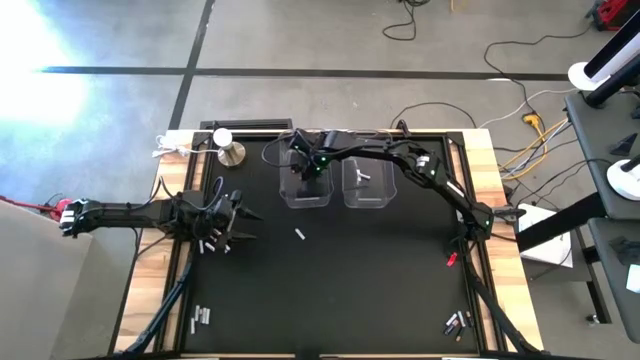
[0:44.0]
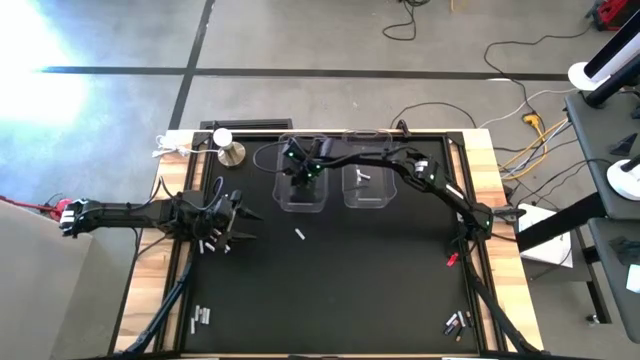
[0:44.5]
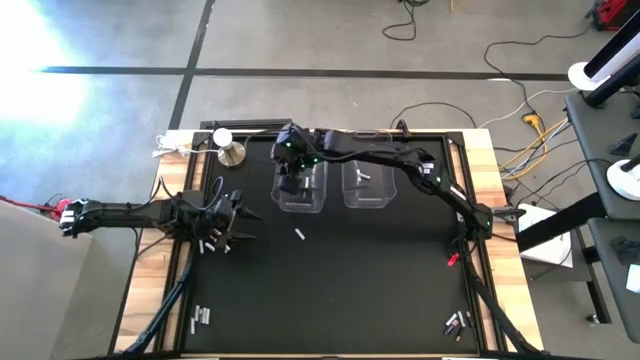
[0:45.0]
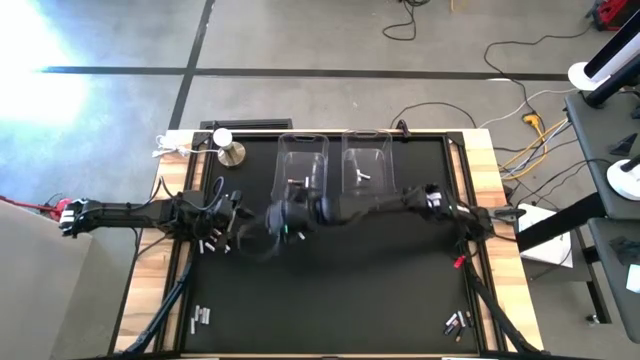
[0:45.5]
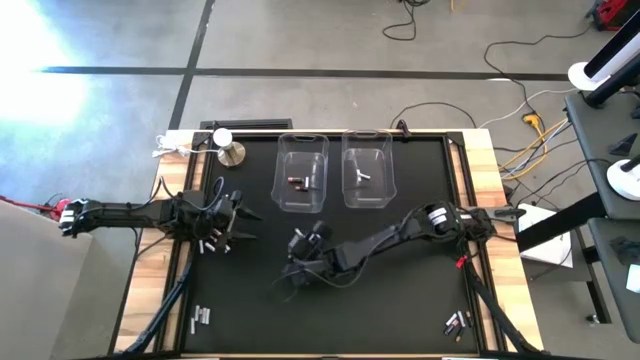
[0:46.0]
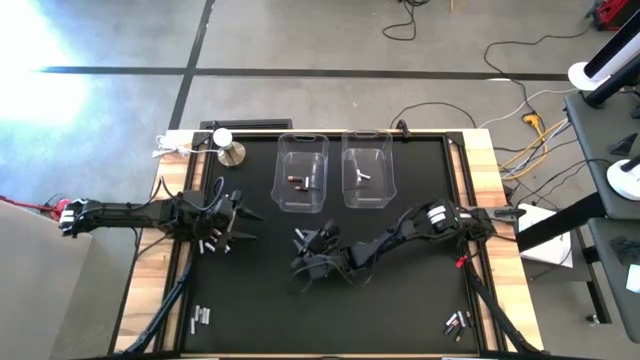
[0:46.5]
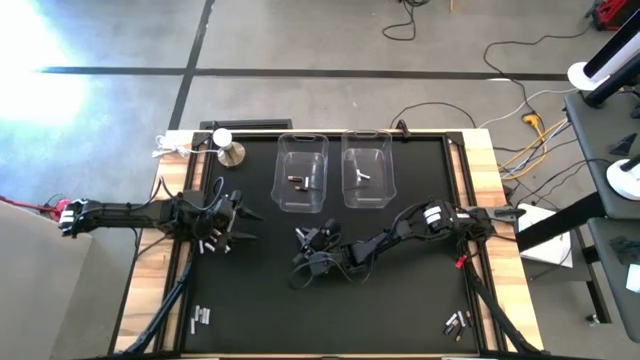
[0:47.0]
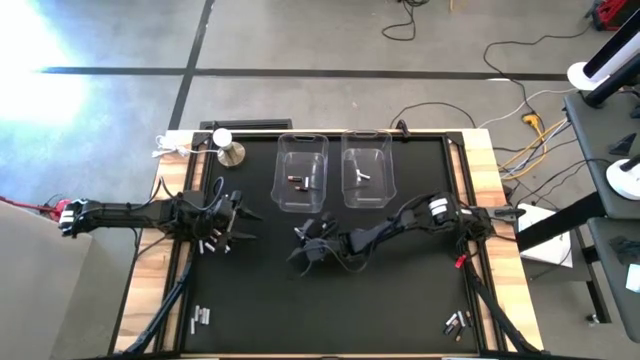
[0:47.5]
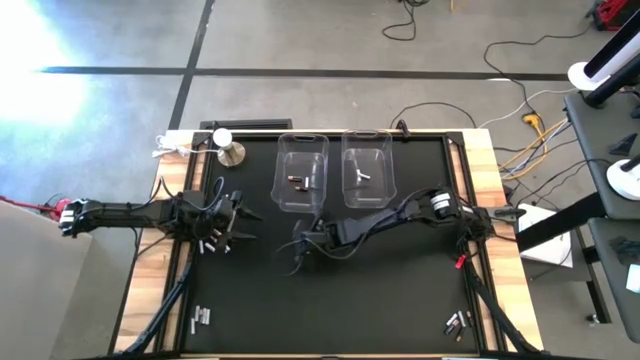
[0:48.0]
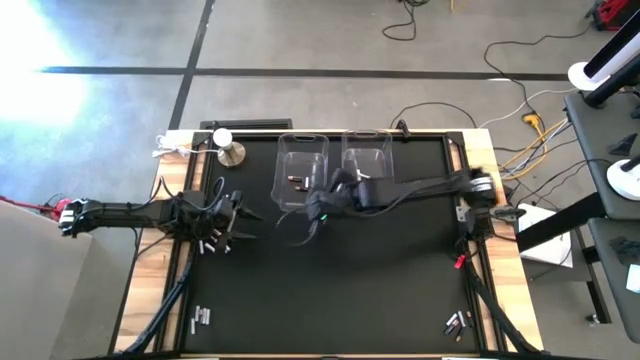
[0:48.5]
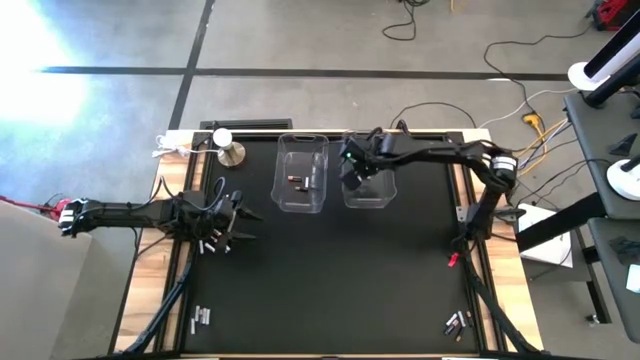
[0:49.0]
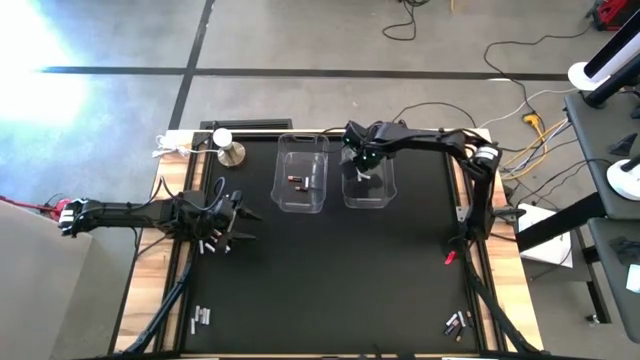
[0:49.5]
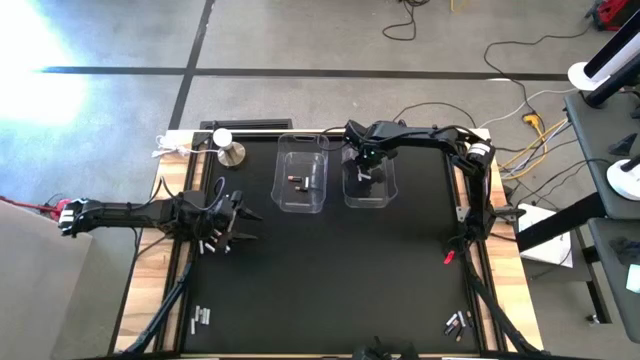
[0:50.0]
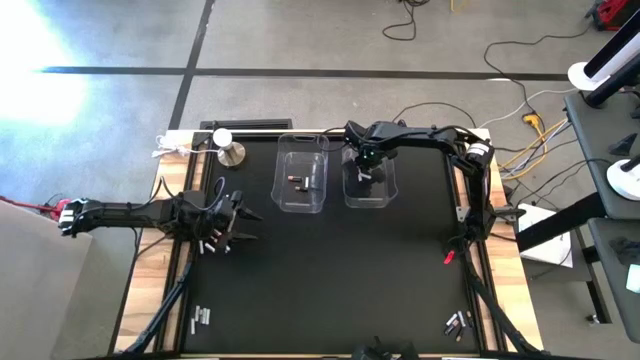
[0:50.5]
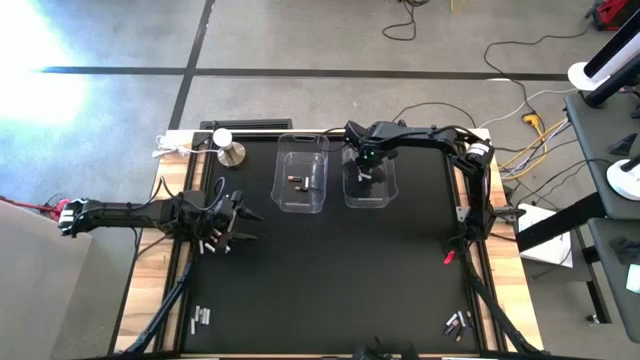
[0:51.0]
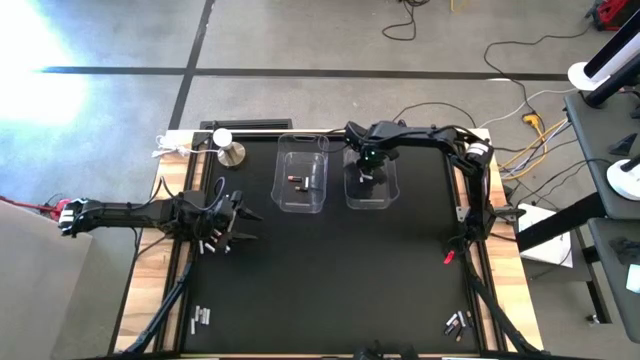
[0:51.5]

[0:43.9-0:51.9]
Task: Sort batteries
Put the white battery into the right transparent bin

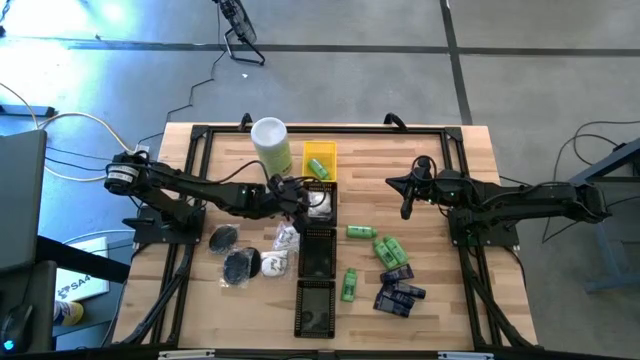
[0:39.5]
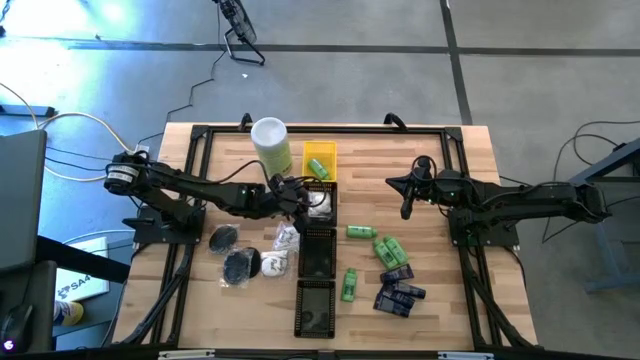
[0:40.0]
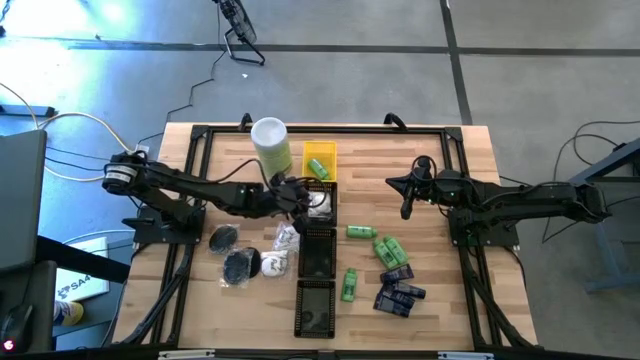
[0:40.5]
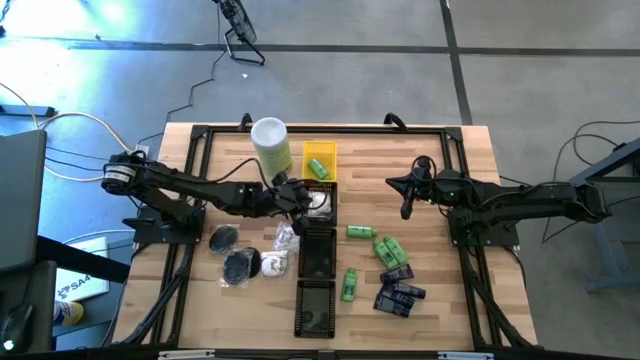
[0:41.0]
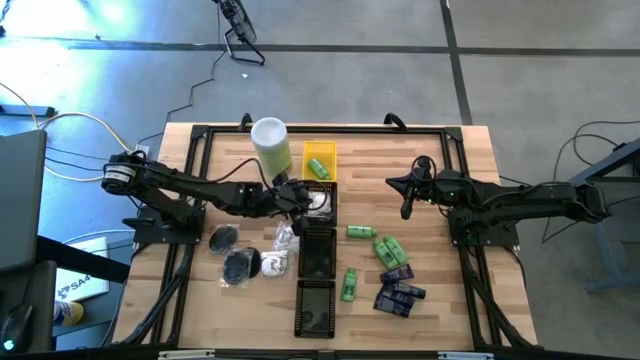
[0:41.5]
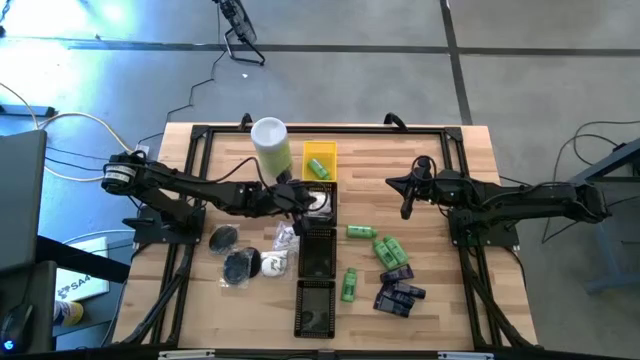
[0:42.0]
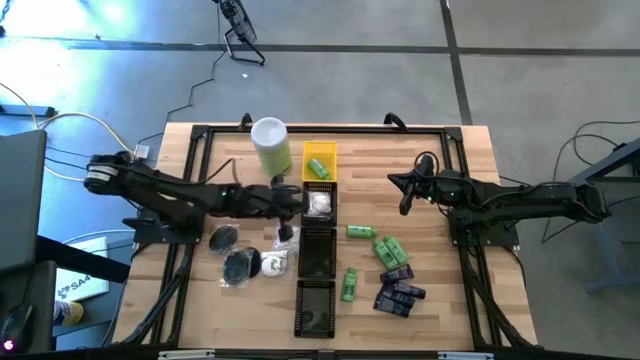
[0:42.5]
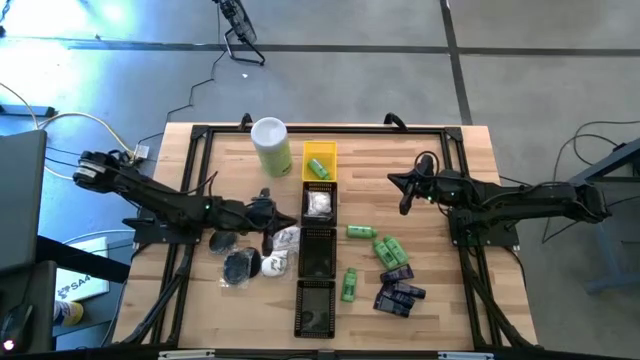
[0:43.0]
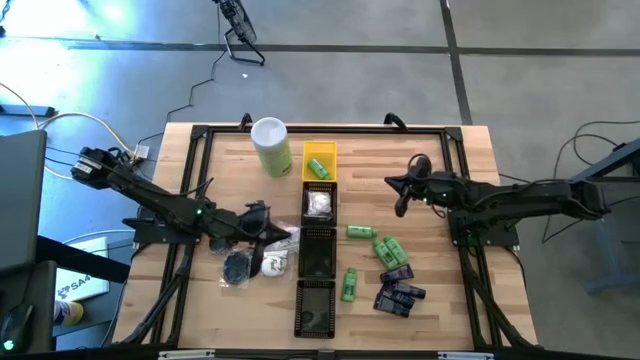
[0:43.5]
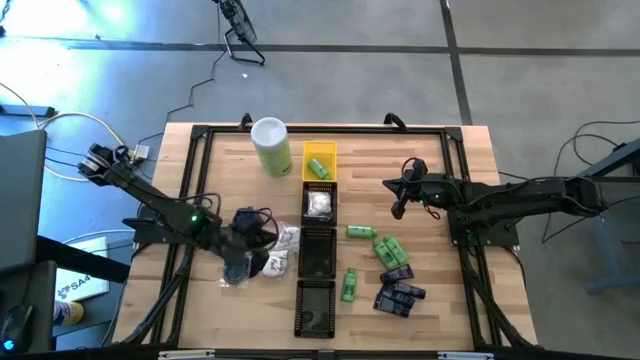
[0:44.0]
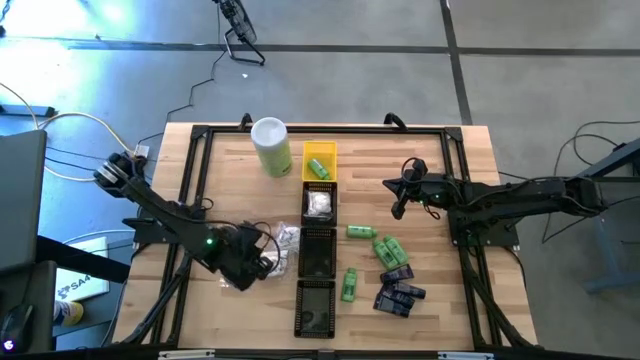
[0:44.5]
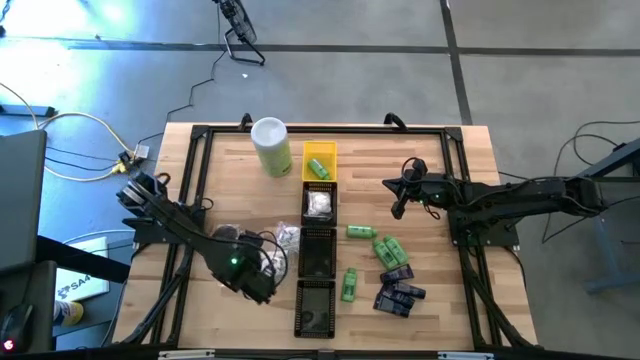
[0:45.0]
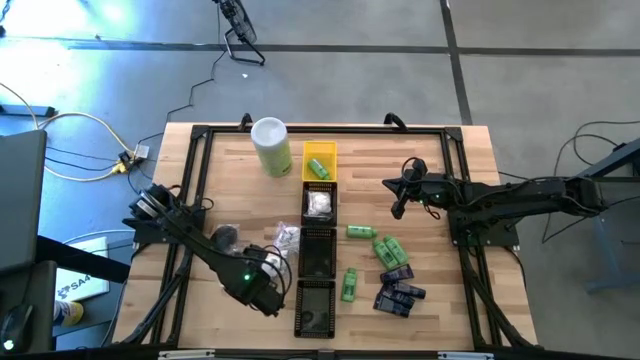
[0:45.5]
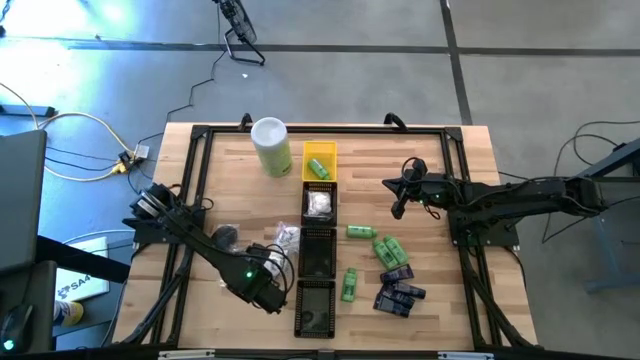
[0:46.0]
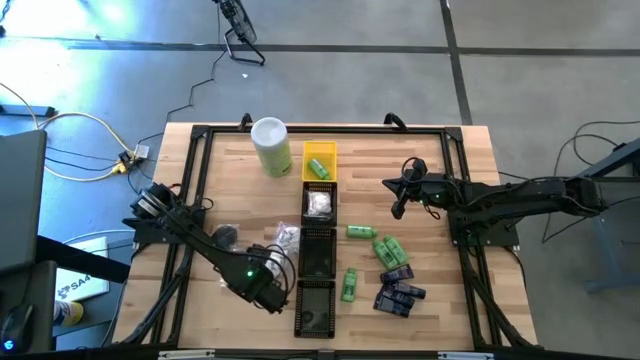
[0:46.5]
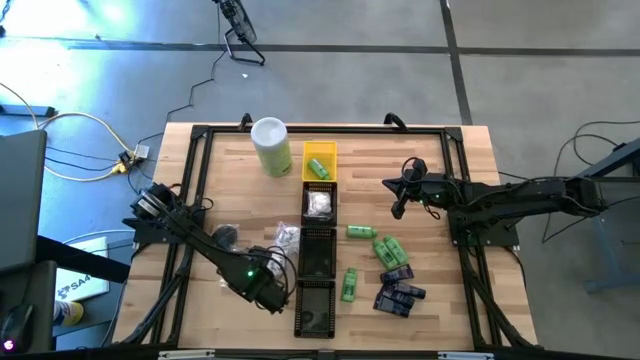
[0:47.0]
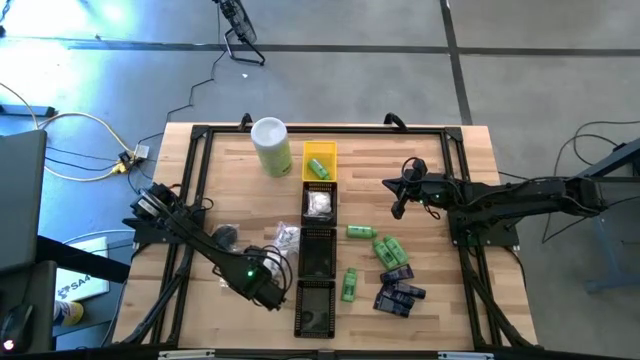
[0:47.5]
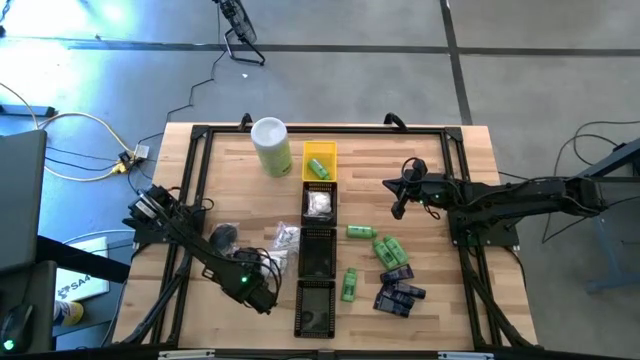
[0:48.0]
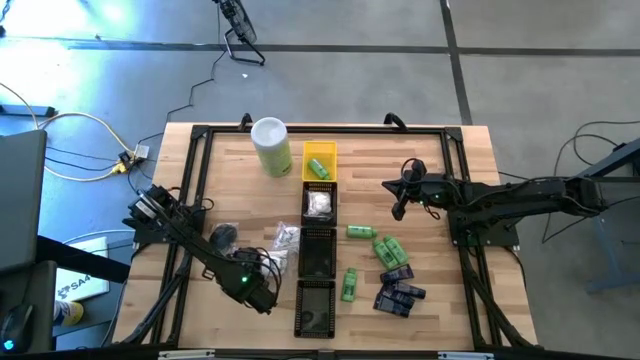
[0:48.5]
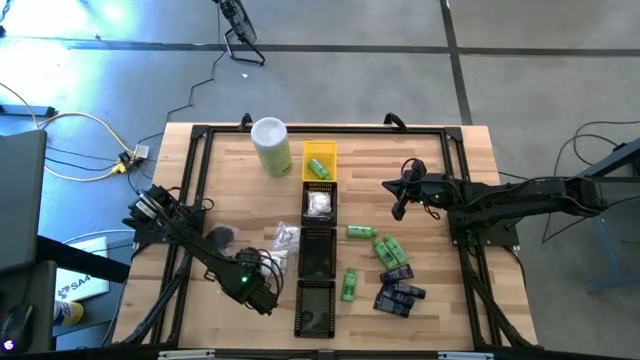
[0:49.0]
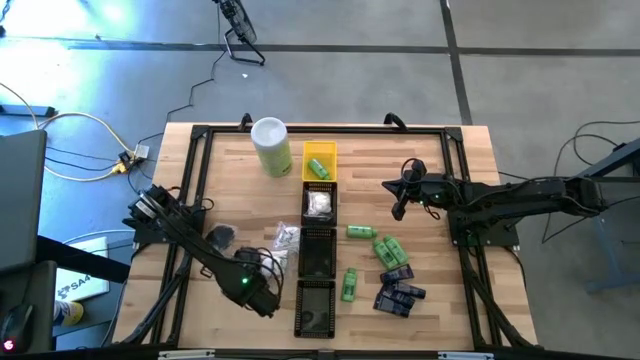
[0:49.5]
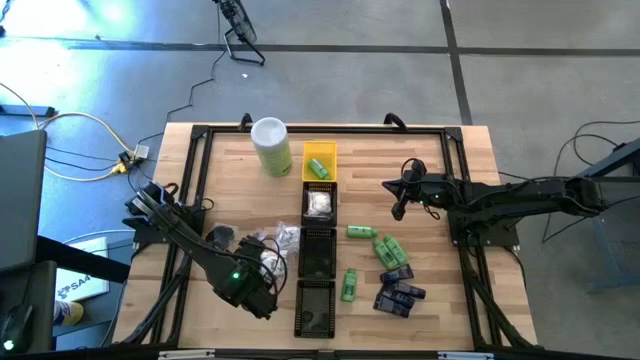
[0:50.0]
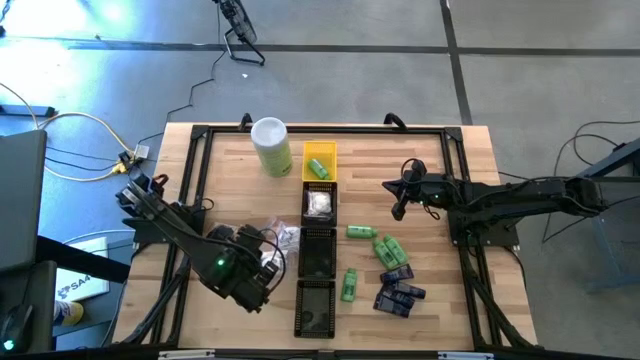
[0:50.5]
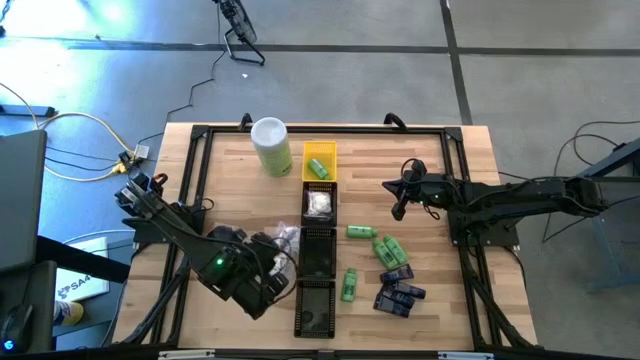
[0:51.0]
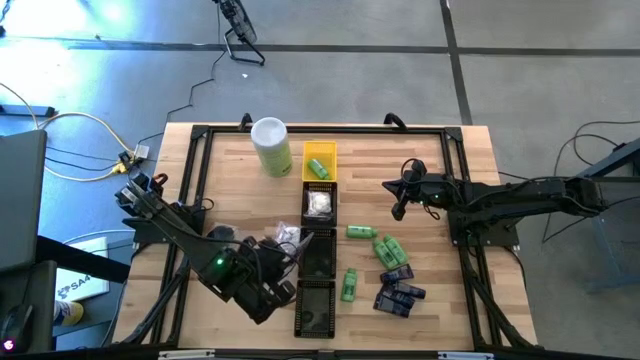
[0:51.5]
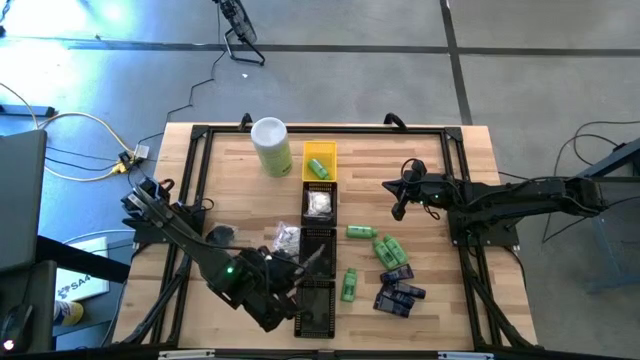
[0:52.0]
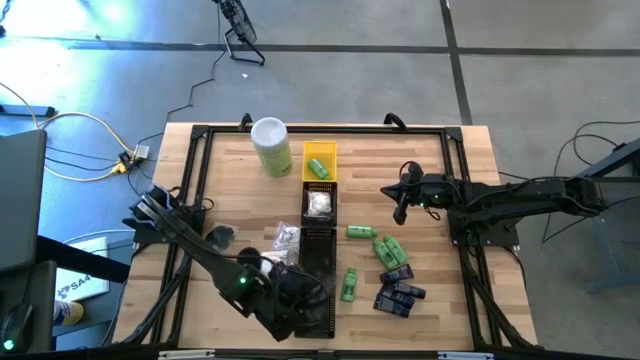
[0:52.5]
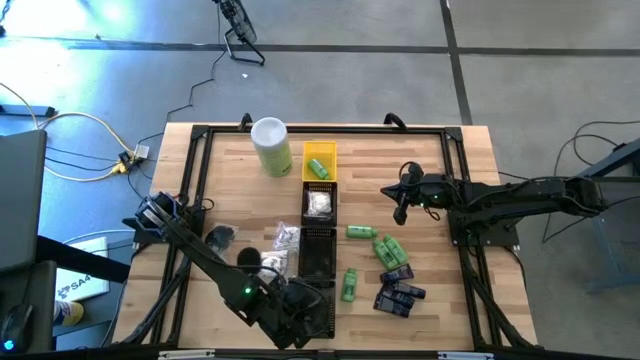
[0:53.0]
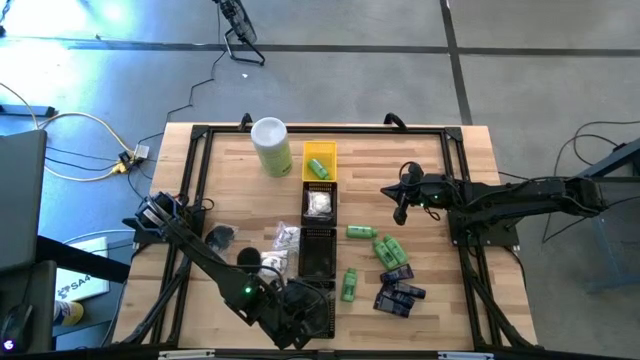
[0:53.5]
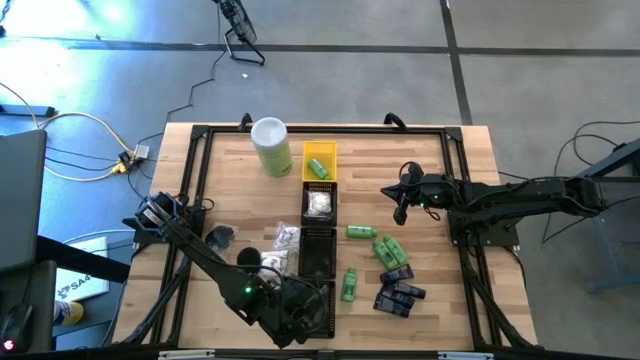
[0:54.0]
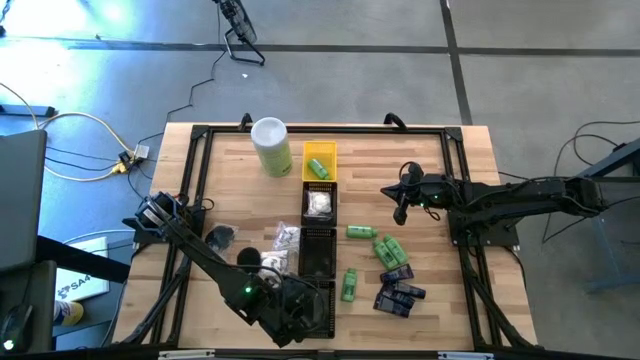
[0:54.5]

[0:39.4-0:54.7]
Task: Pick & Place Travel size toiletries
Put the bottom black hairbrush into the bottom black basket
